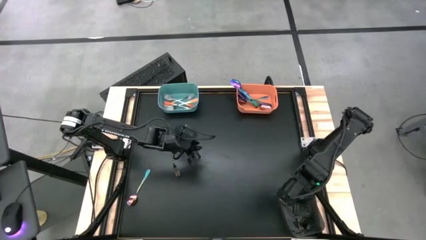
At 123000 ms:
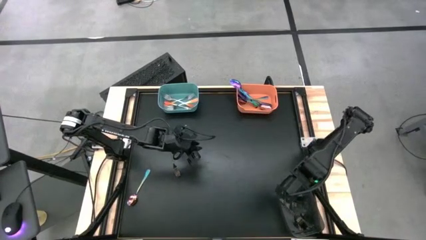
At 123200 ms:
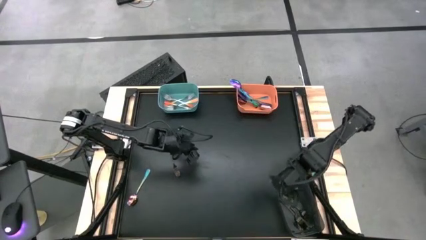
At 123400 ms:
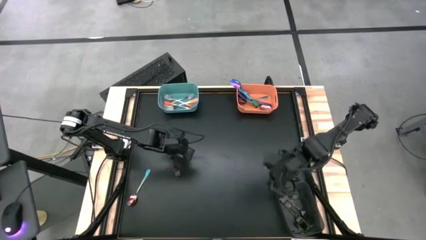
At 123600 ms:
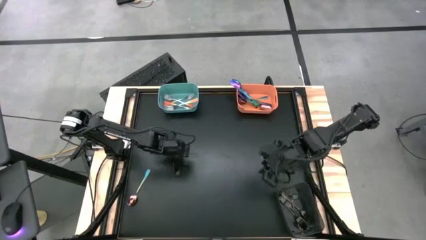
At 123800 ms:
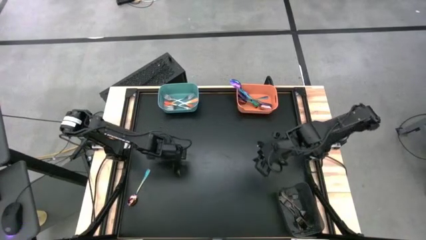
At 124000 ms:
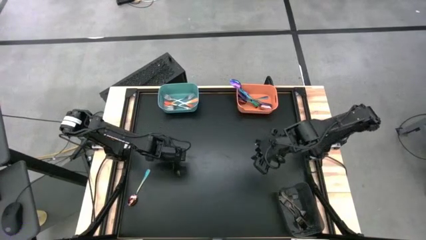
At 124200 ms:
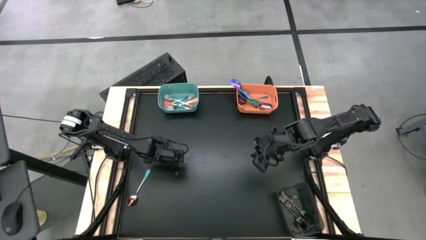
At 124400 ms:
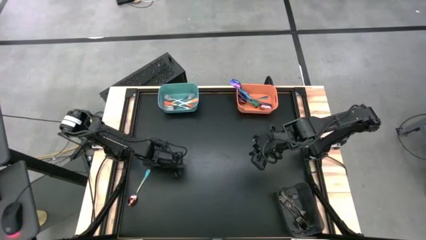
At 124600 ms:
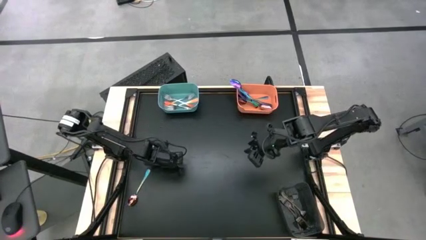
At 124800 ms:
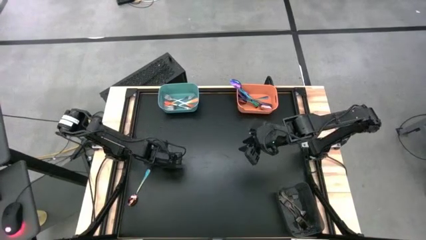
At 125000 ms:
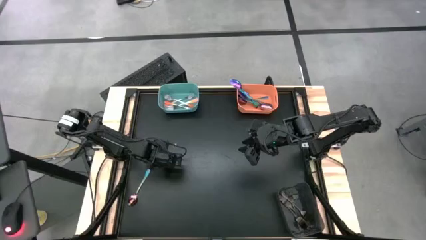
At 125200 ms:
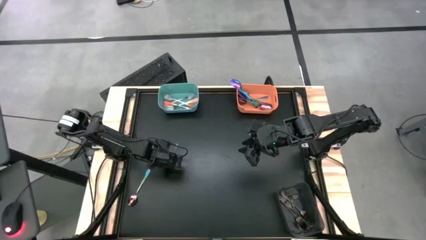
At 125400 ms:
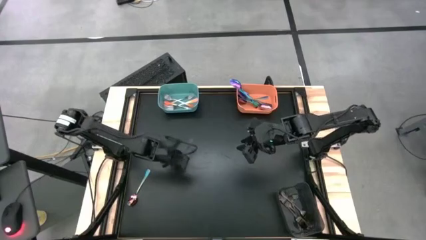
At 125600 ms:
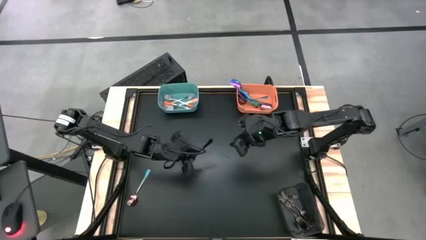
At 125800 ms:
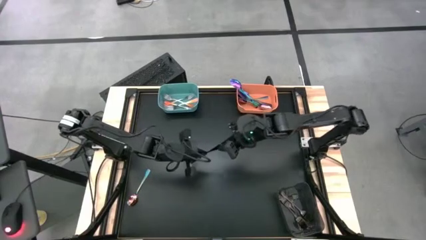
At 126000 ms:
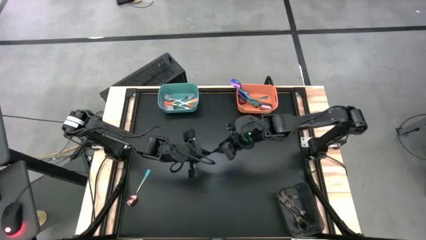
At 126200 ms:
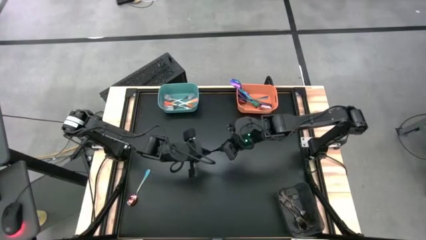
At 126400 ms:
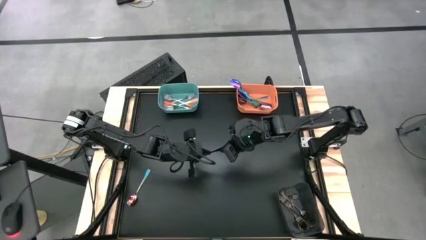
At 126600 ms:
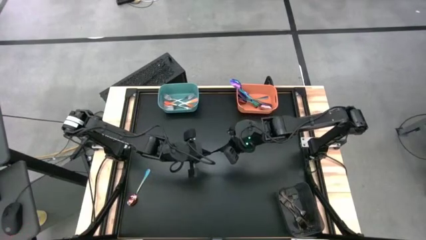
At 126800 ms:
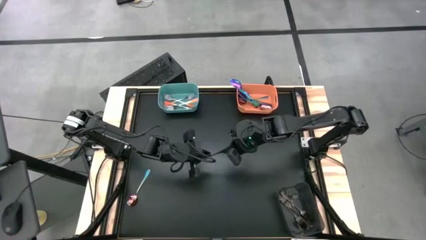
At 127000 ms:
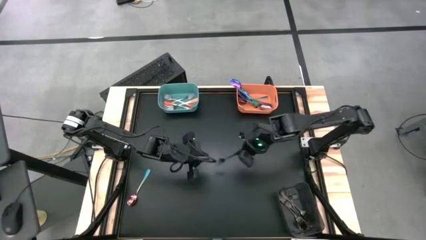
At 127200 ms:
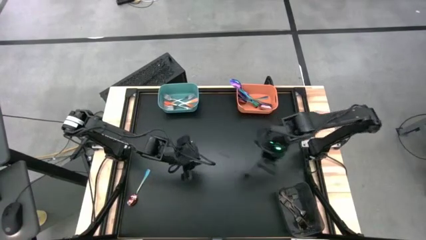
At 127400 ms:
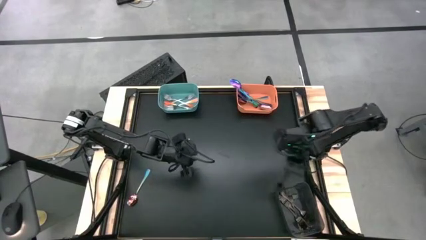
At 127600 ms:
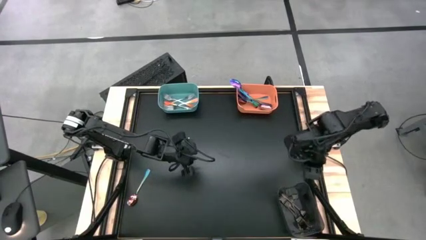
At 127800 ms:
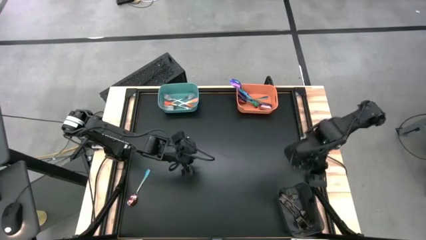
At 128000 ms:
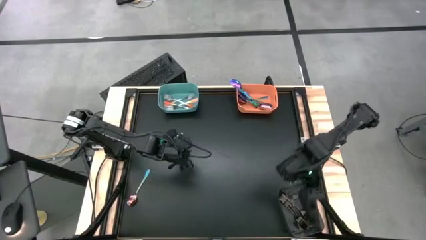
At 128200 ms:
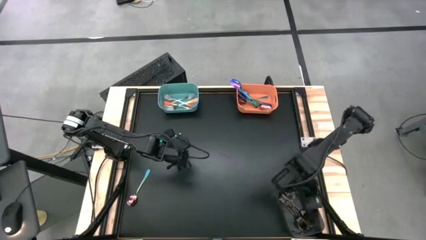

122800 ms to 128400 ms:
Task: Sort silverware by color (type)
Put the black fork into the black bin

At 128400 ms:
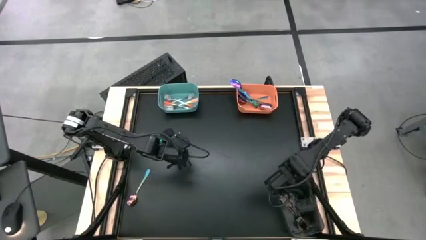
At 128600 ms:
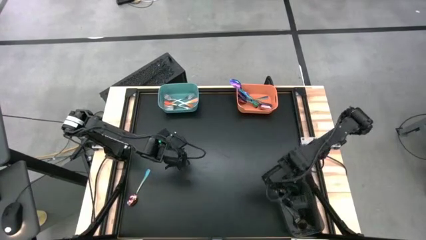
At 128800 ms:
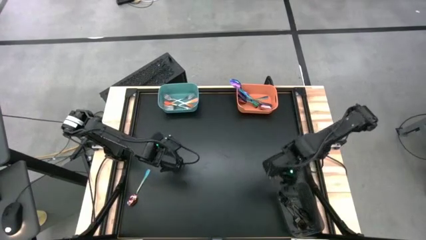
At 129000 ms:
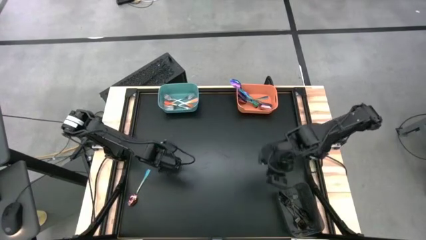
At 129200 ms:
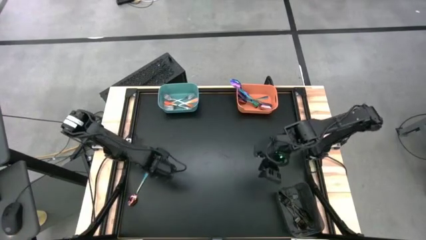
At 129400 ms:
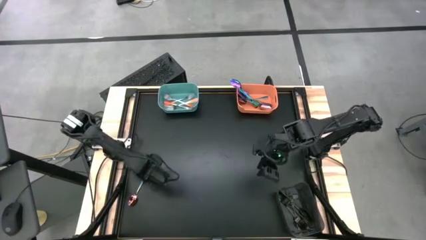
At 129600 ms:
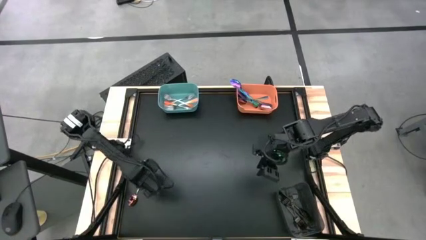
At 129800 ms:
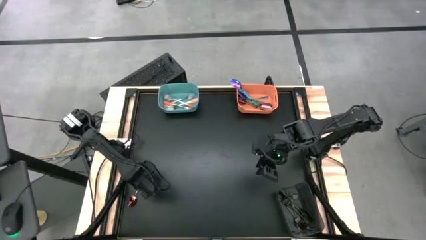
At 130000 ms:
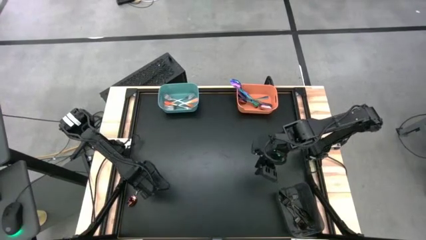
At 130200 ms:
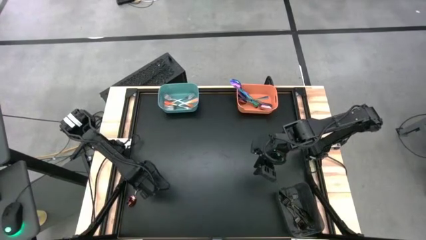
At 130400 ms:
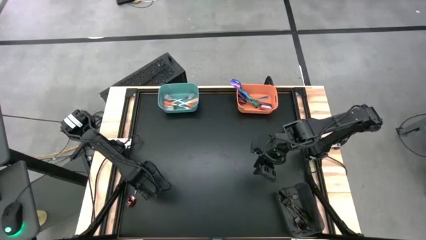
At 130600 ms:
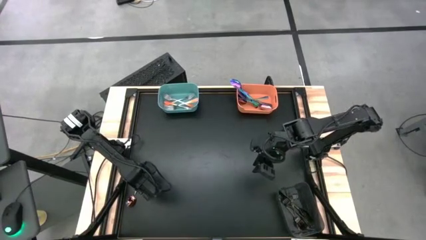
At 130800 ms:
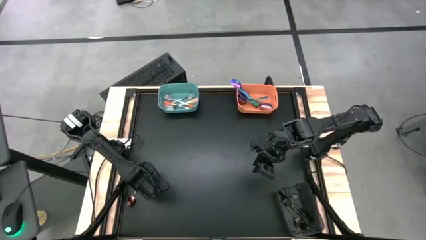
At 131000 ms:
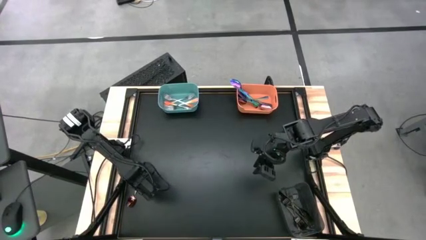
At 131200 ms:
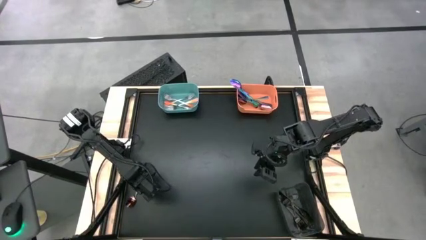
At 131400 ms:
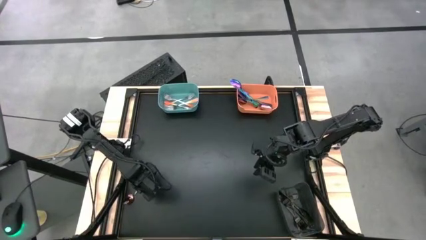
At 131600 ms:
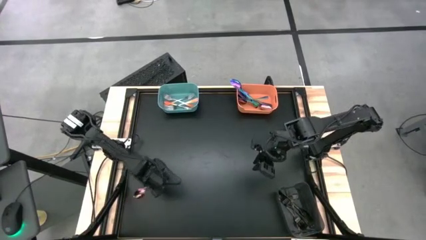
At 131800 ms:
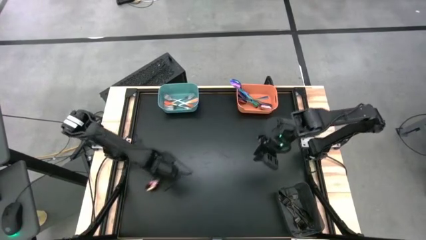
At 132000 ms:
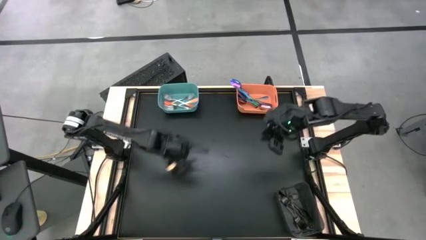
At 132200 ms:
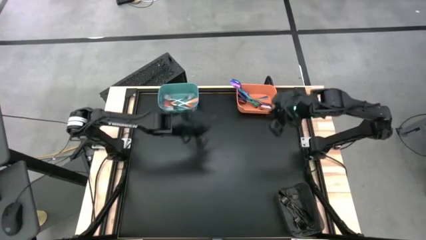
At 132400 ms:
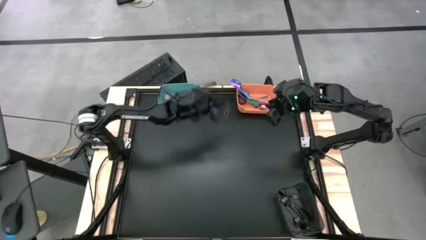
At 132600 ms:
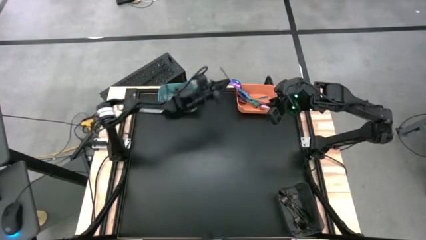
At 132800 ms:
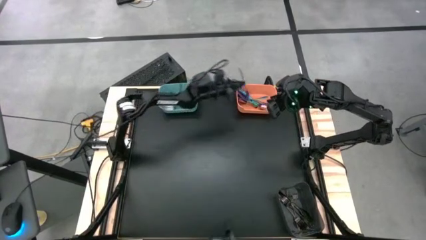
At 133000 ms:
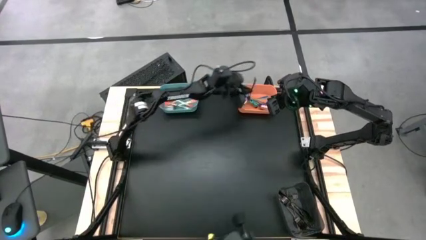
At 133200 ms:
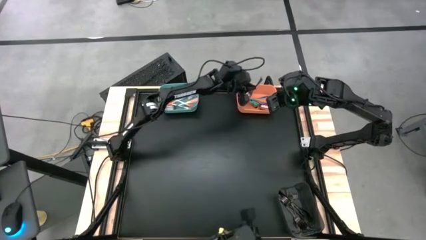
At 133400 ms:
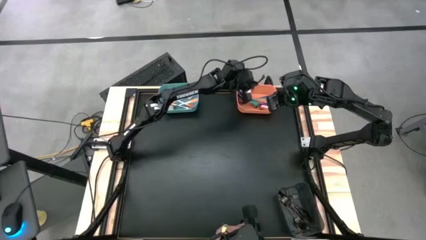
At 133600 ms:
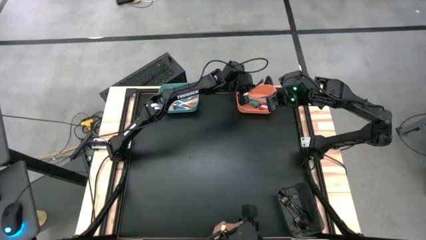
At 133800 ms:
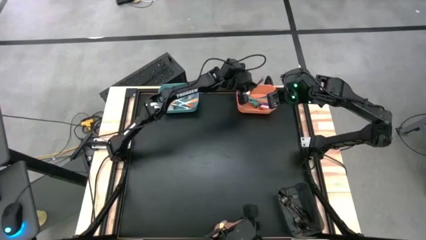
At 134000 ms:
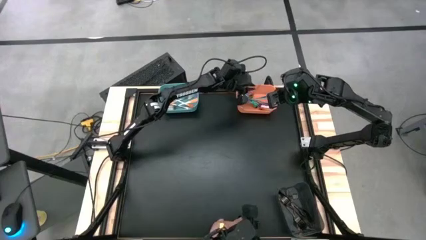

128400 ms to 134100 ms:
Put the purple spoon into the orange bin

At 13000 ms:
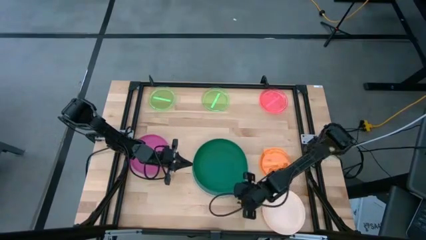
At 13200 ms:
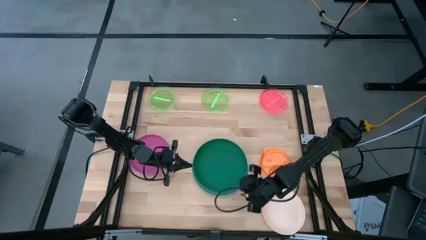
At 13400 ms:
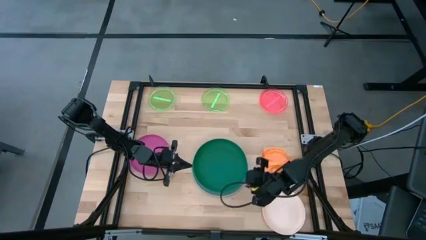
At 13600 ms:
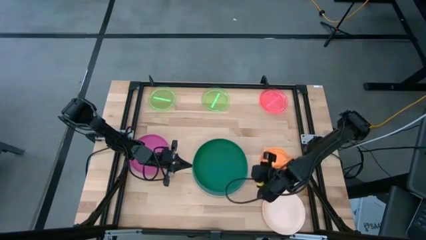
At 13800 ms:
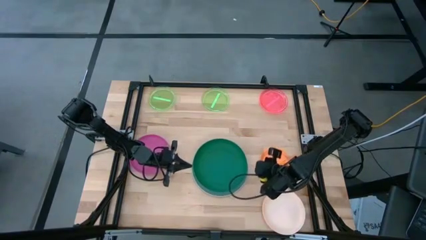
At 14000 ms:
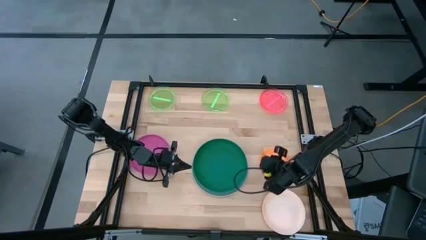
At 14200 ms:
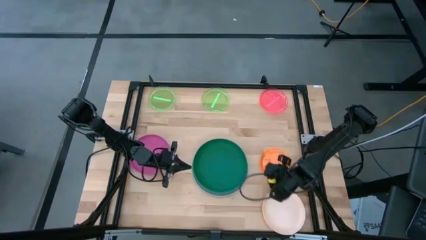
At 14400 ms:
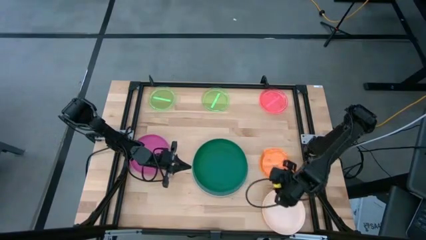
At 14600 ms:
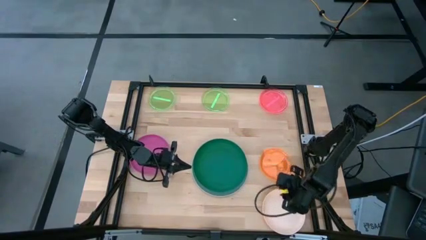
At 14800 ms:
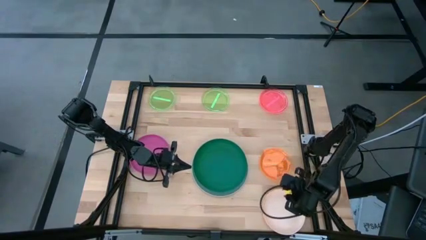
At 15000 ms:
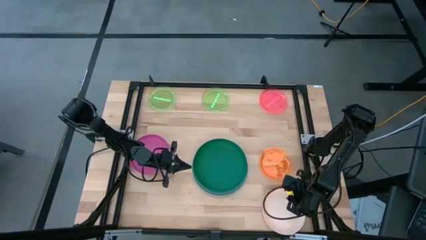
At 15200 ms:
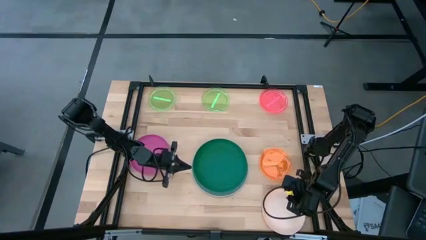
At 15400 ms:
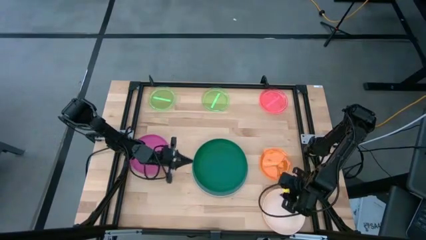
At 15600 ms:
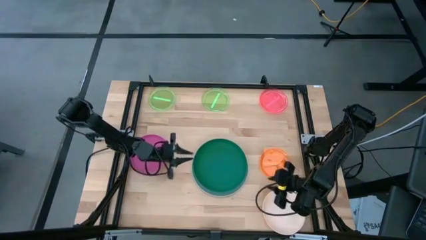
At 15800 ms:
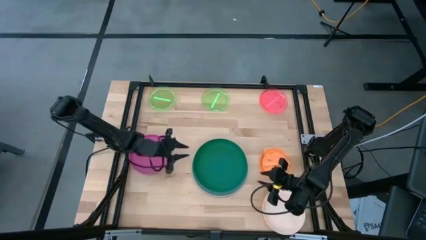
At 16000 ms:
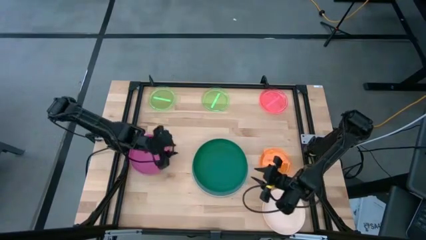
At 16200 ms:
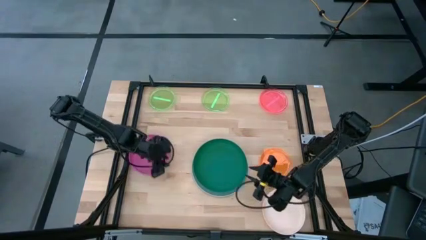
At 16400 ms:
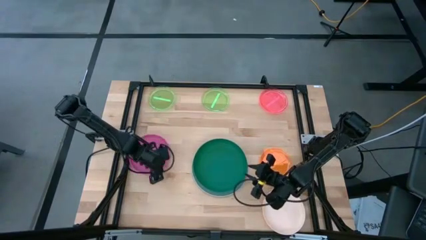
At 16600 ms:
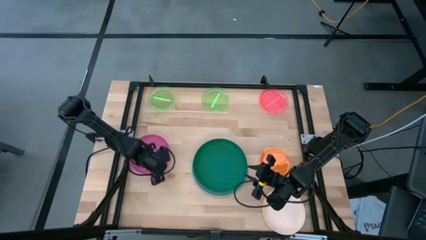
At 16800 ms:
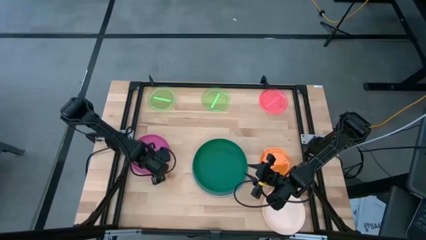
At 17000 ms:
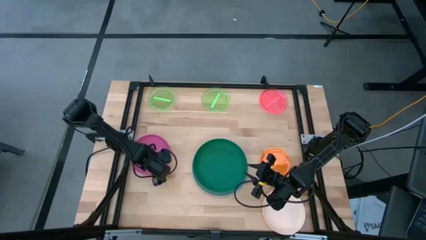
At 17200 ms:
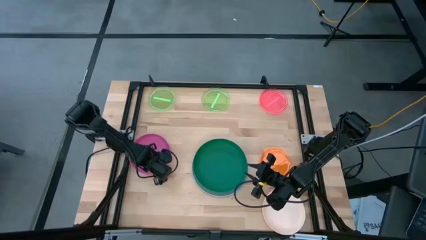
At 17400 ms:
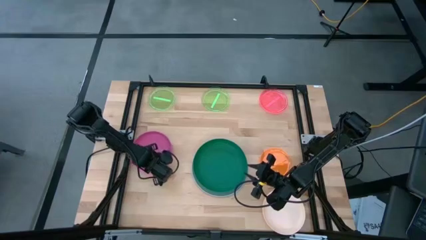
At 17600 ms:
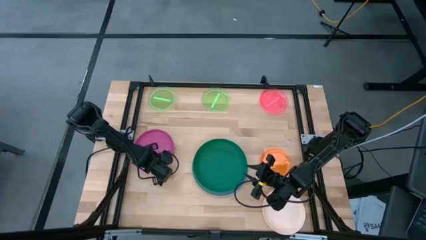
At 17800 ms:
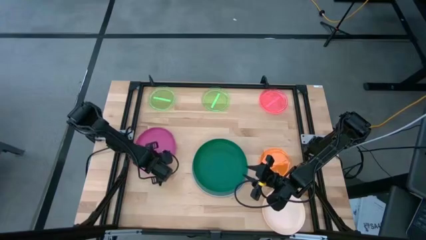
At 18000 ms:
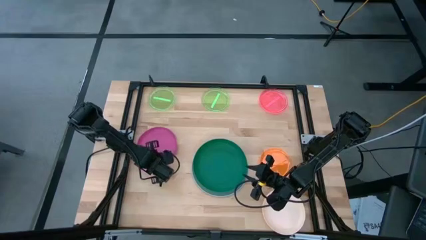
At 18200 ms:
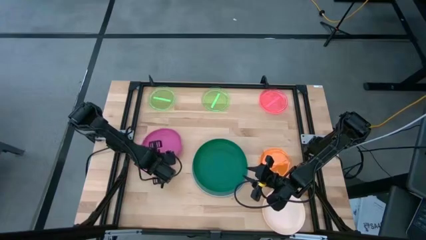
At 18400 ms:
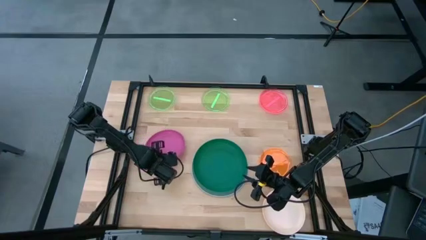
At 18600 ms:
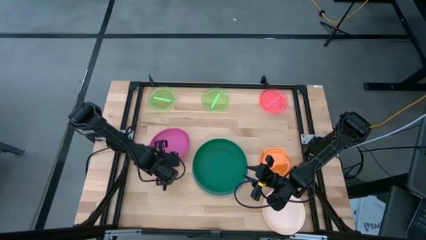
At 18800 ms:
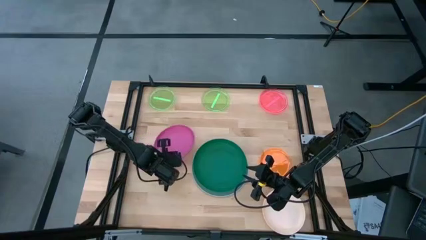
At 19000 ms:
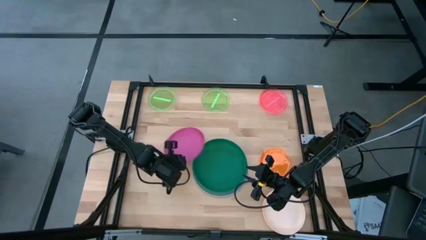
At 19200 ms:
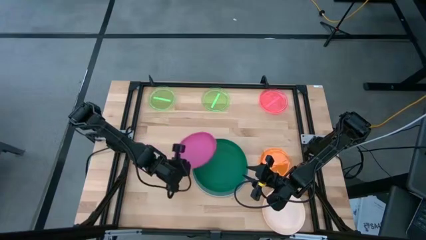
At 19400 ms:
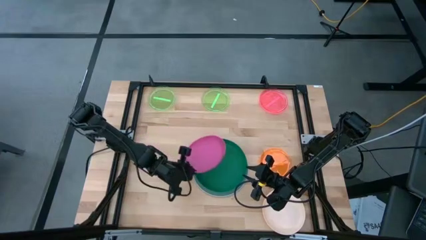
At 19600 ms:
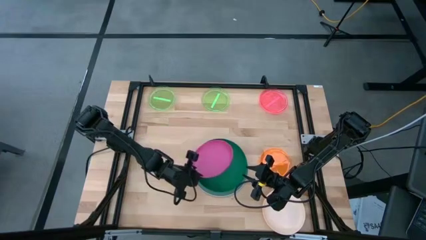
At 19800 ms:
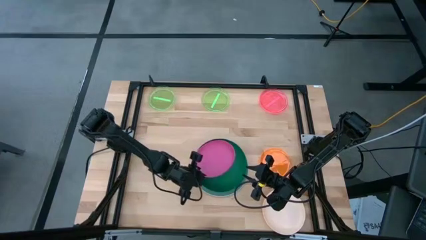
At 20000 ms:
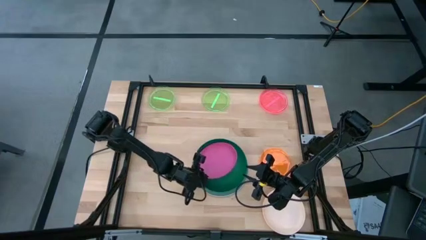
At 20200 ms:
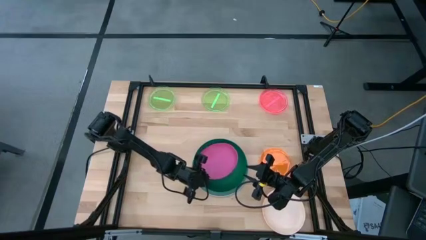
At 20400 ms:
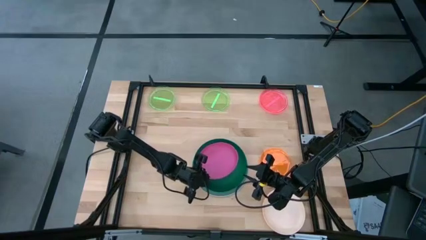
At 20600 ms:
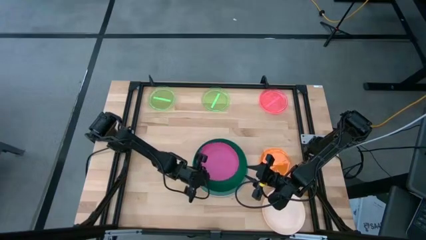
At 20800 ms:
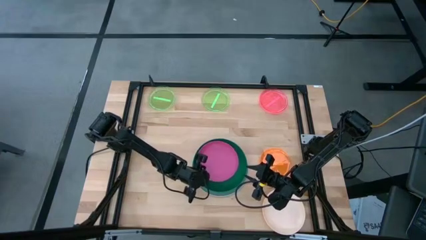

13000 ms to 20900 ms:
Task: Stack plastic plates
Stack the pink plate on top of the green plate
